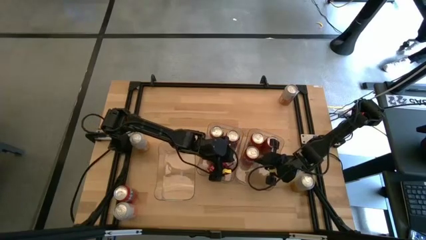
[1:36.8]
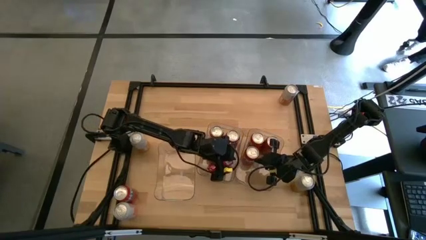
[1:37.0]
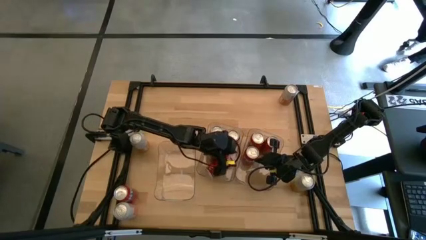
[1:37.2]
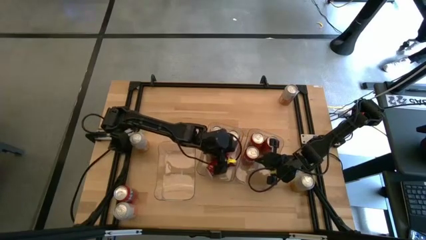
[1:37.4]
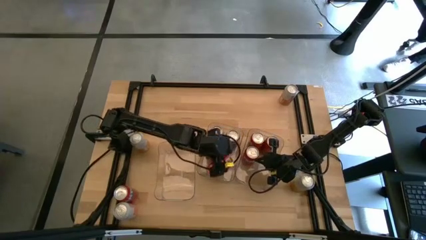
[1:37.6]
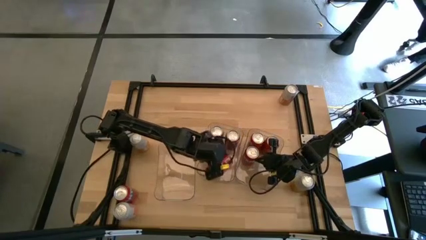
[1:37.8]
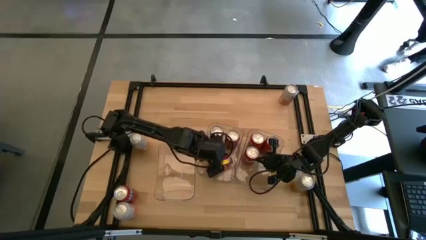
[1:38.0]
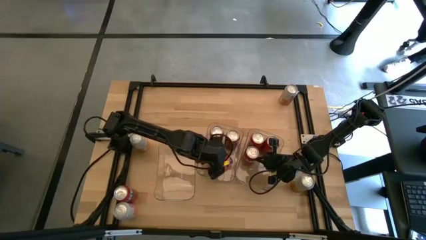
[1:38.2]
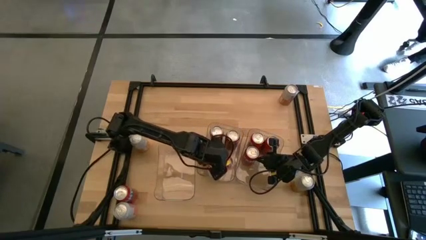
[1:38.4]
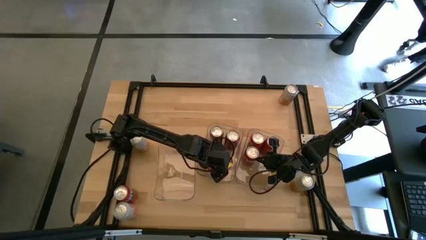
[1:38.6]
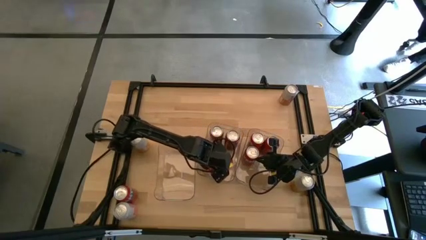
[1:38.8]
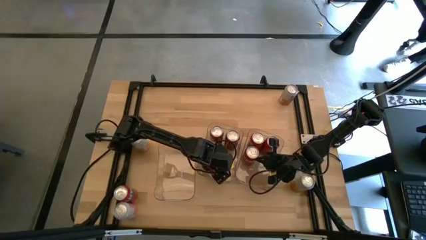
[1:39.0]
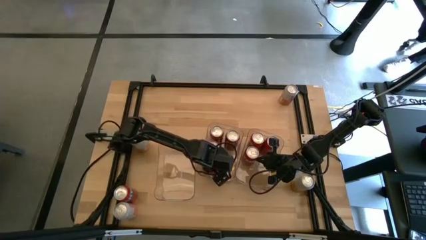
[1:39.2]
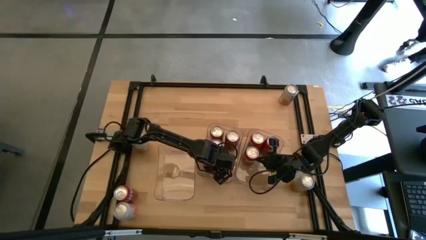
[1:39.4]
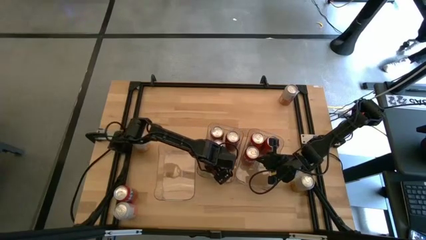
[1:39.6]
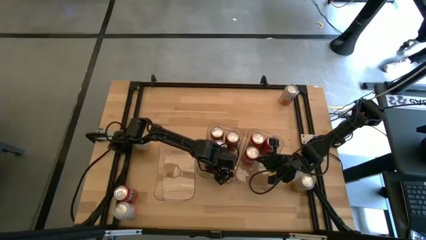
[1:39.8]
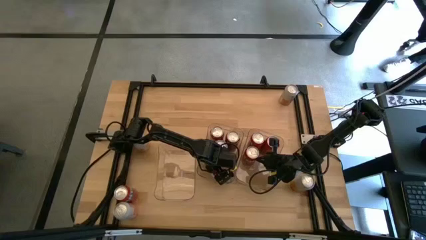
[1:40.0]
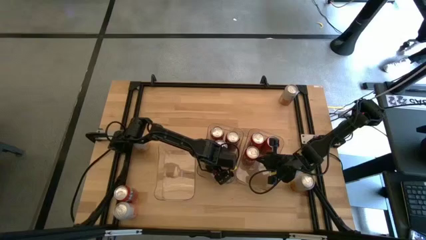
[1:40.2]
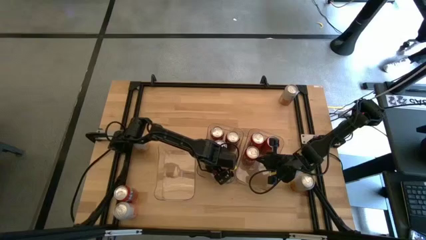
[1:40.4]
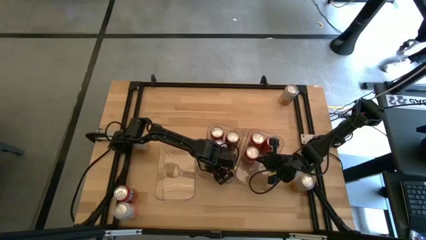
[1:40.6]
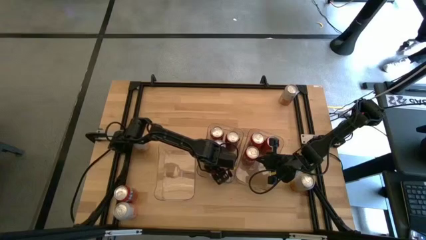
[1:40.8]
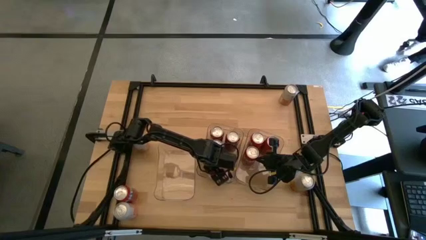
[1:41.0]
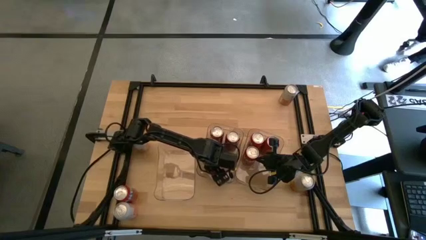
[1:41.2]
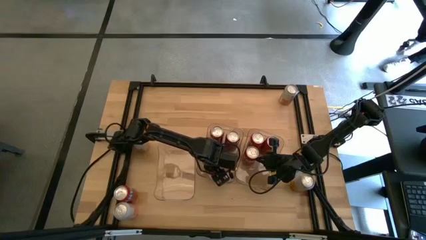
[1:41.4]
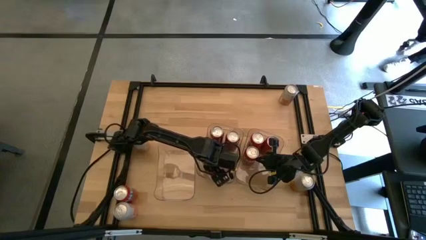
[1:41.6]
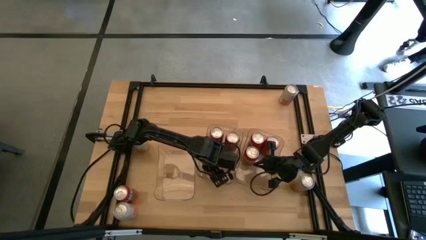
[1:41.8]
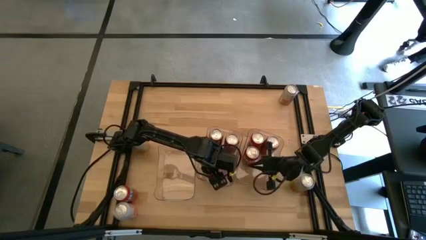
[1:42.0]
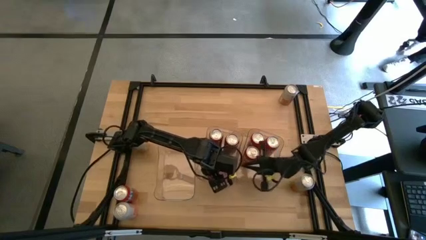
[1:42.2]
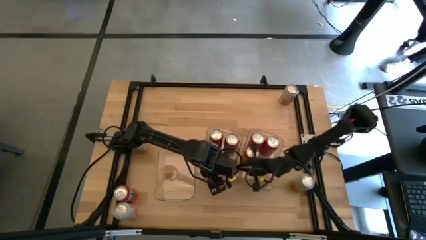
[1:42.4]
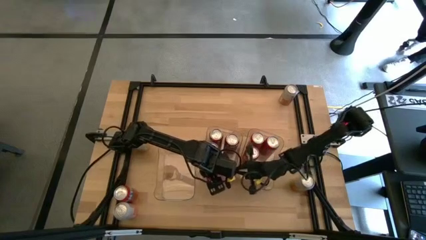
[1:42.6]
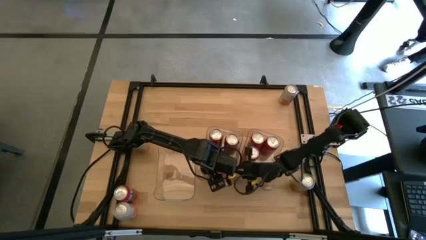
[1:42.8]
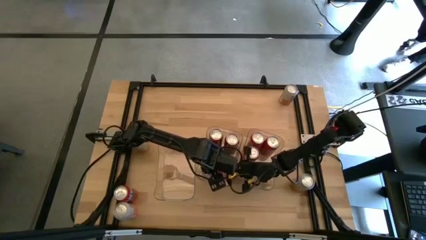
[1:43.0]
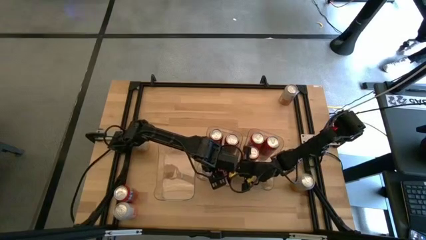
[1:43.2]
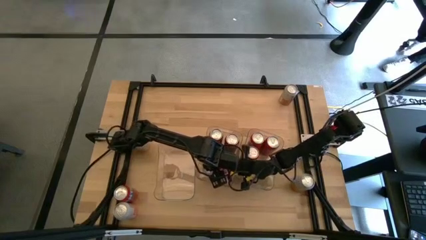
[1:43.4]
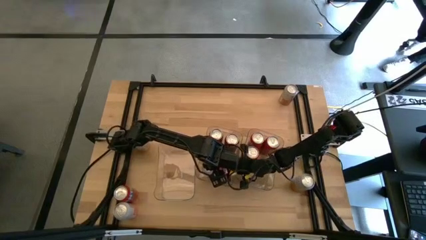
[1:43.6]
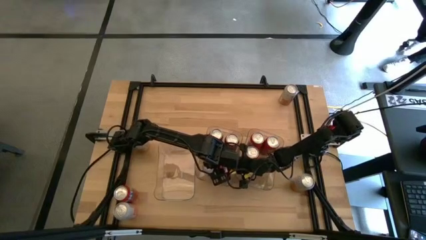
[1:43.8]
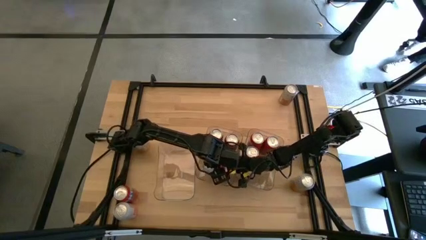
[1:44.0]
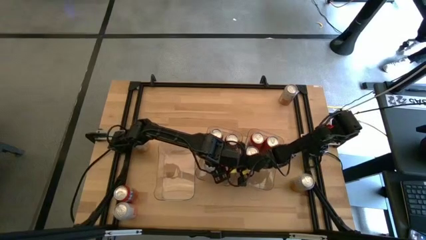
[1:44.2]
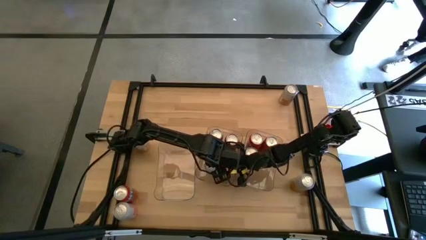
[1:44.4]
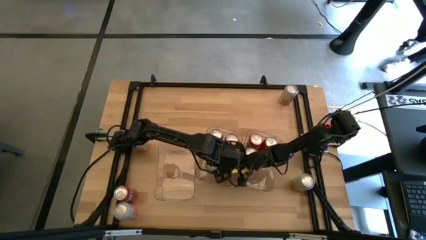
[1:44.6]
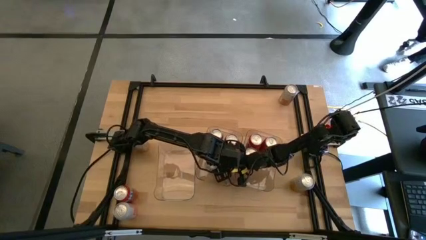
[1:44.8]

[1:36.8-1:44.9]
Task: Sort soda cans
Adjust the red soda can on the center transparent bin

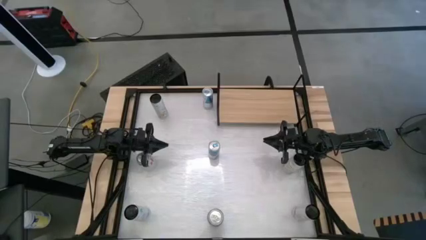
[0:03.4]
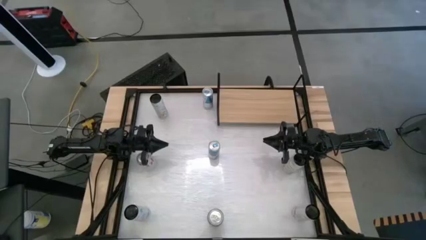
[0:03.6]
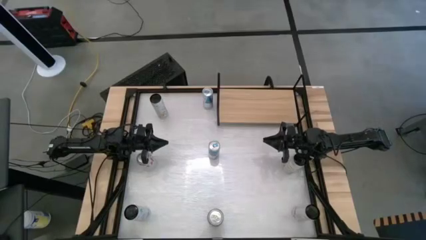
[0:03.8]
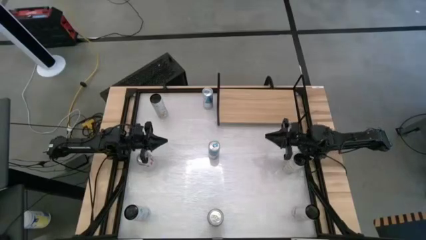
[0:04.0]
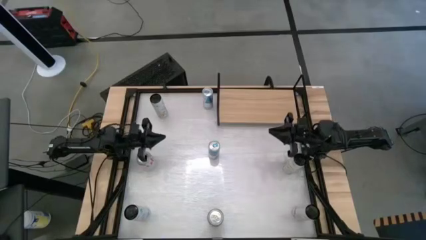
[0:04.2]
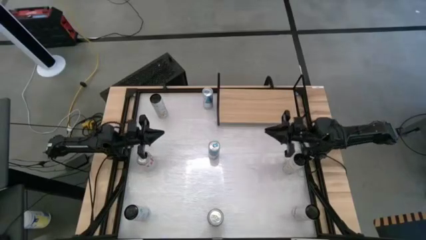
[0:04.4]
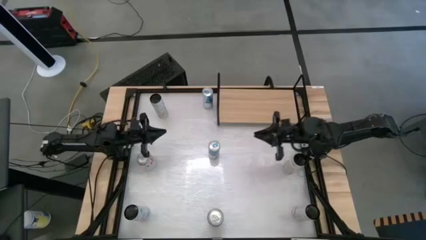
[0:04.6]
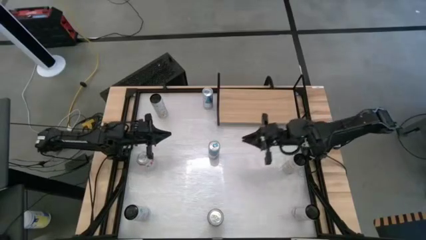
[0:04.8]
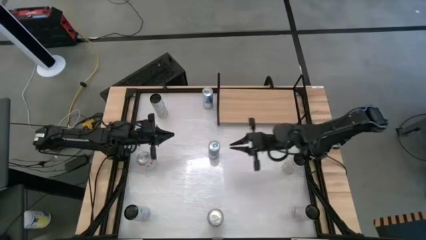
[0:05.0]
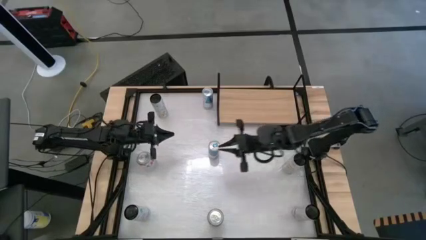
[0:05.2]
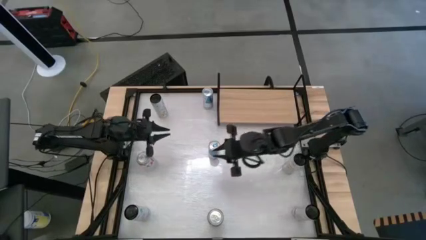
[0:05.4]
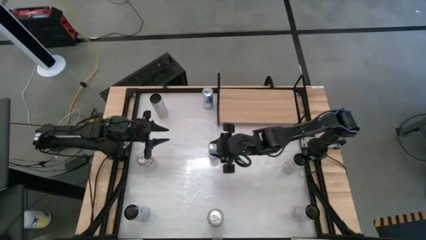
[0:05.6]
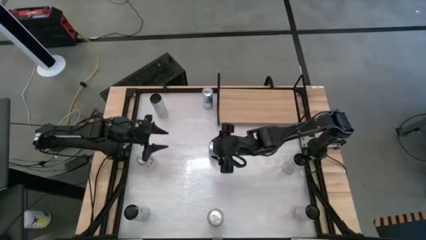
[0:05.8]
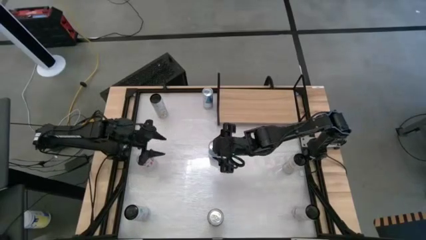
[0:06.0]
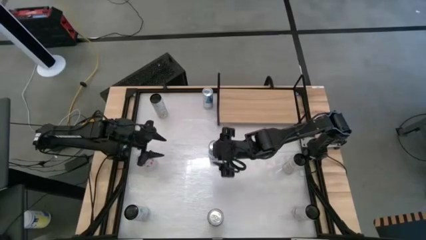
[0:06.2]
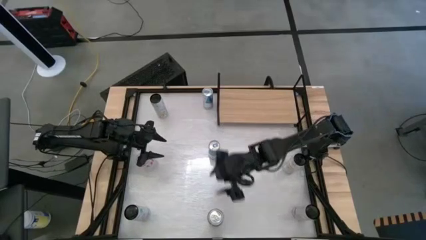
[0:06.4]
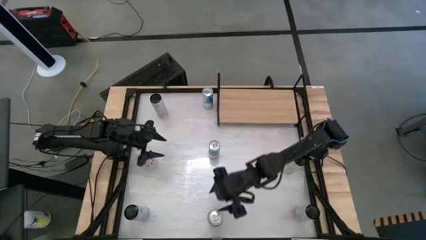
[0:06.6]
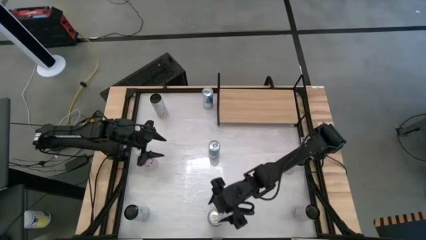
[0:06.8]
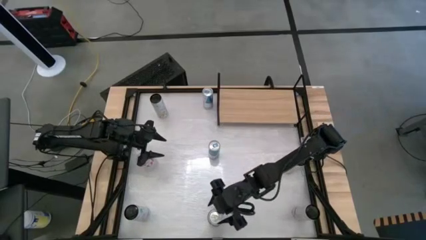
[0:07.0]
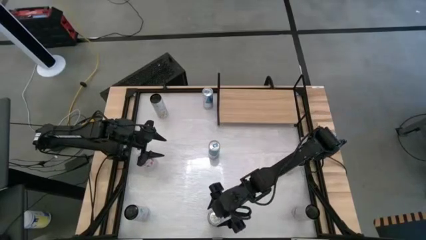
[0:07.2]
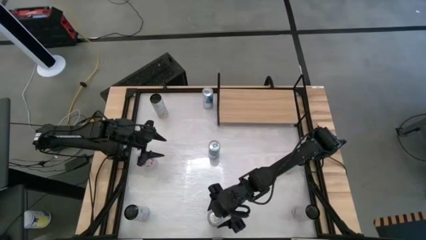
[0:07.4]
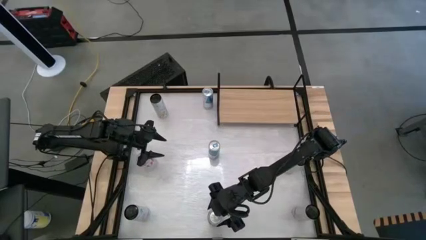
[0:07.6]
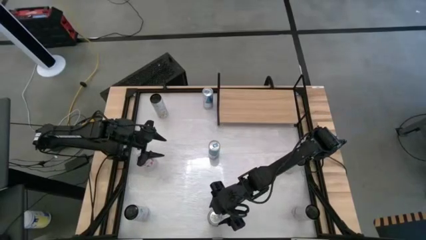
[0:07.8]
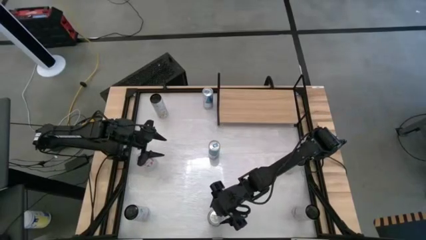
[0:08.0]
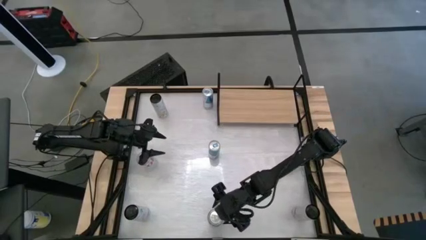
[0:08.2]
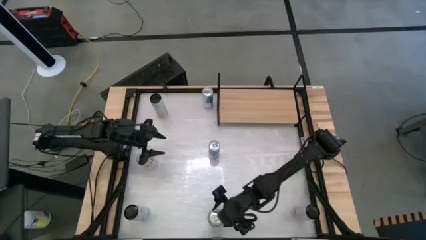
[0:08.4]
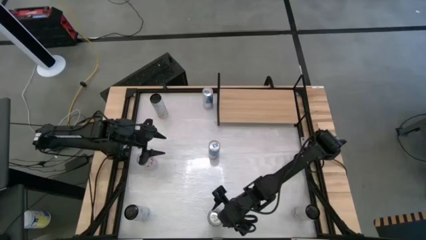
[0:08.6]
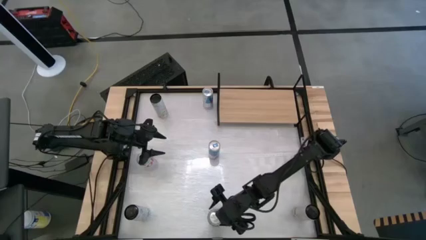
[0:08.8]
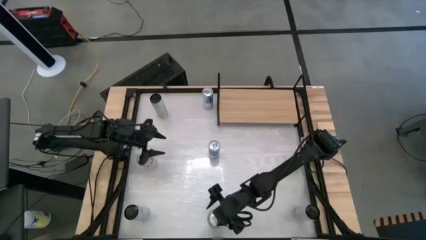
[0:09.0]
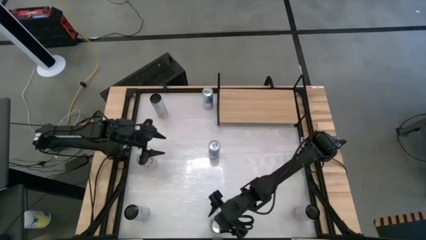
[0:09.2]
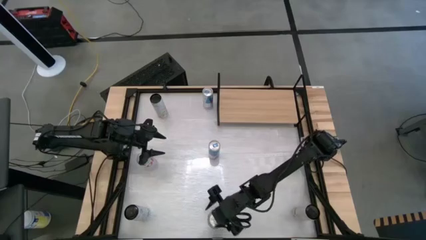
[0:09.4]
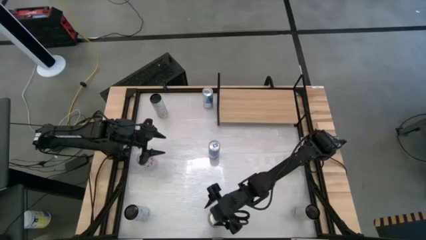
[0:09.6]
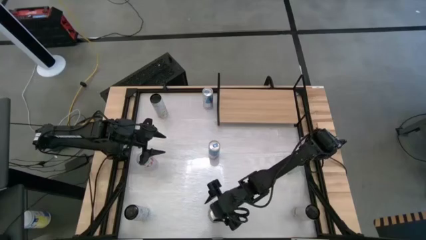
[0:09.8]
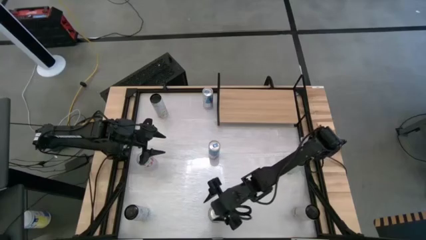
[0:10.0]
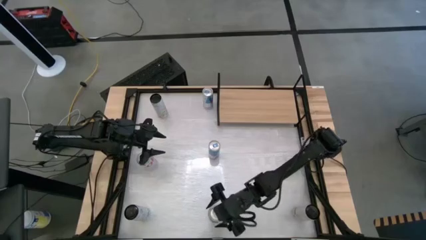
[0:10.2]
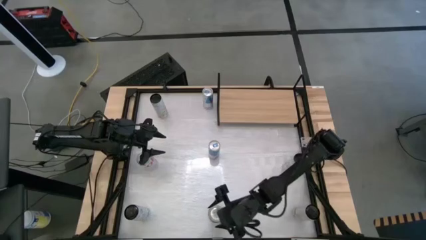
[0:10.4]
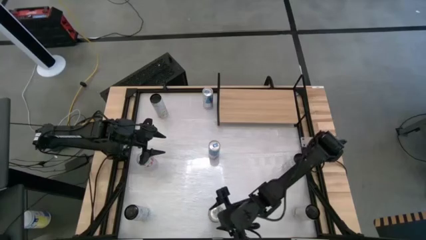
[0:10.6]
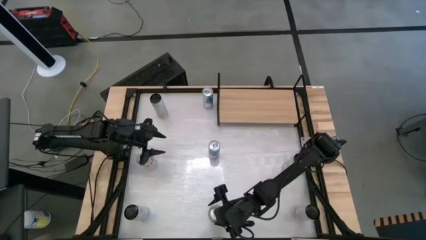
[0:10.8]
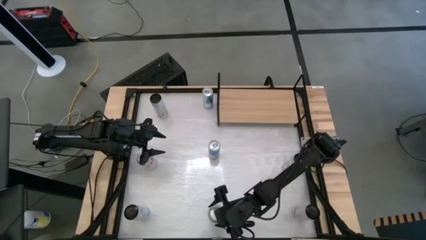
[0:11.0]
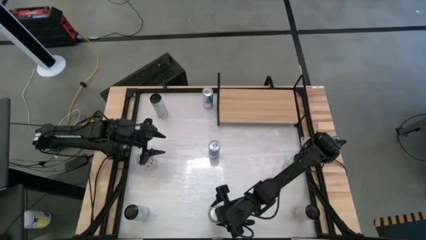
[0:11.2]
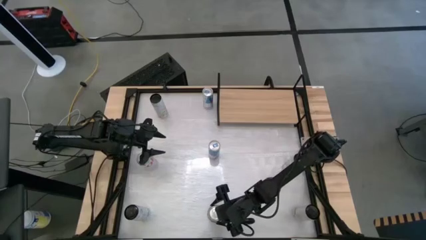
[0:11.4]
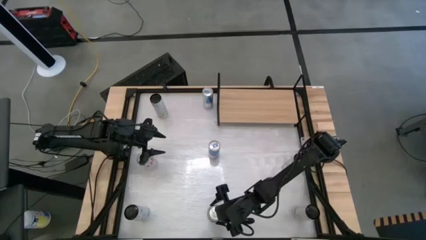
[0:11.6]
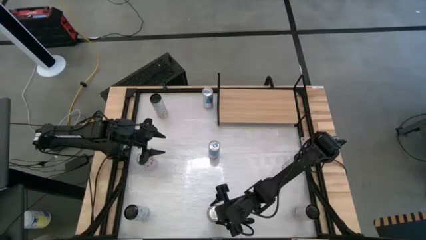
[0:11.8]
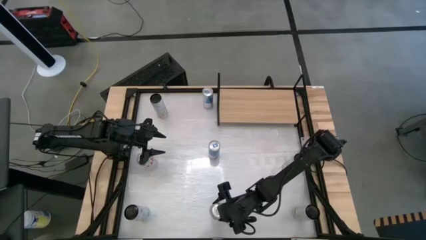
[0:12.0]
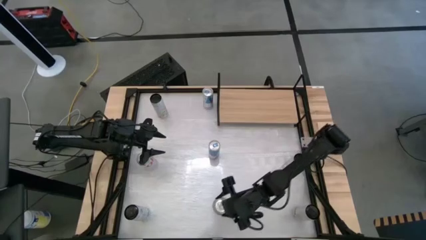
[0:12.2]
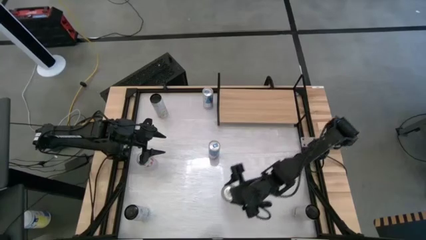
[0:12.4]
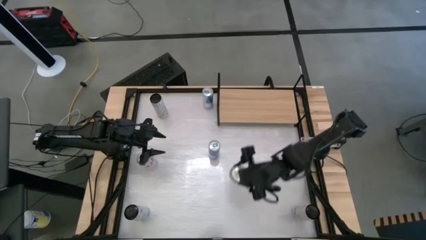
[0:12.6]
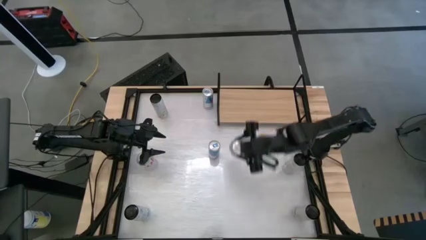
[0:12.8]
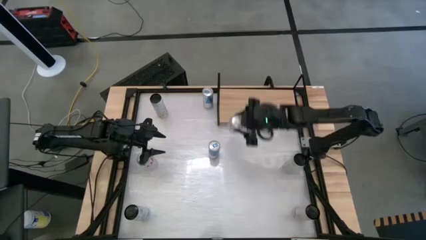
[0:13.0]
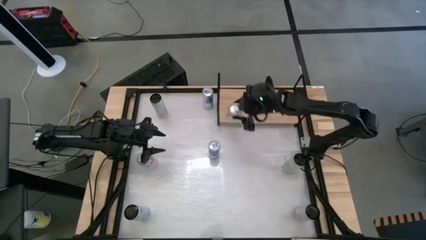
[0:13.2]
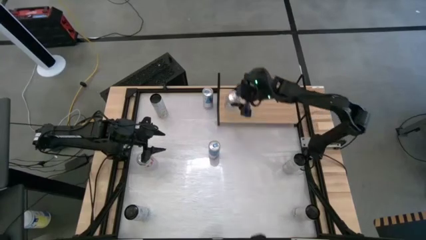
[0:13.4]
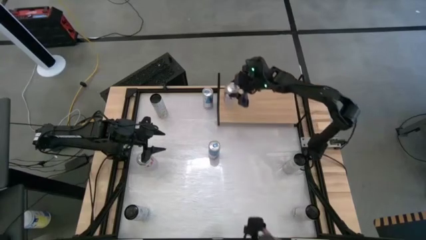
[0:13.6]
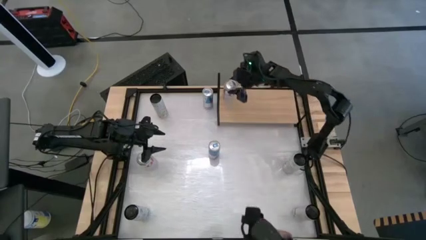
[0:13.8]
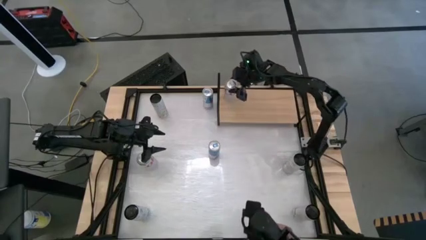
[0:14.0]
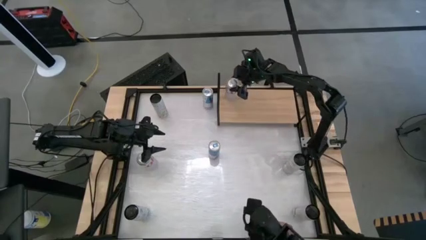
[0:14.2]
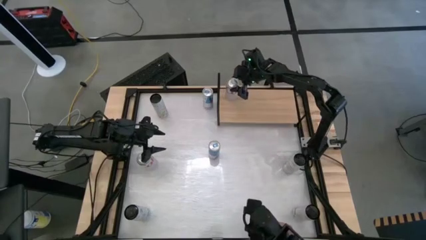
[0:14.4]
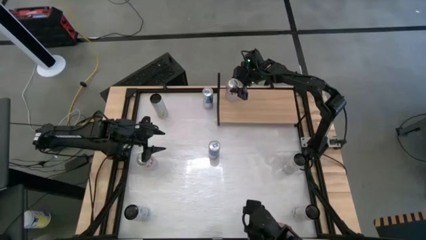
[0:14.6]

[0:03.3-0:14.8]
Task: Place canned beverage on shelf
Put the bottom silver can on the shelf
